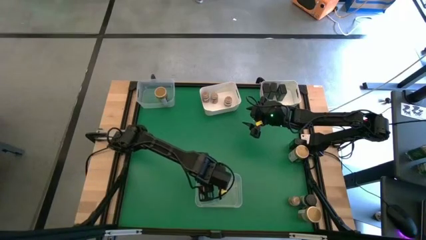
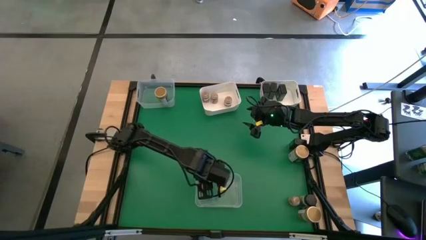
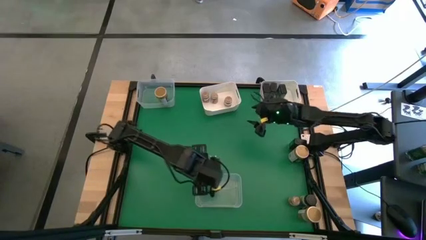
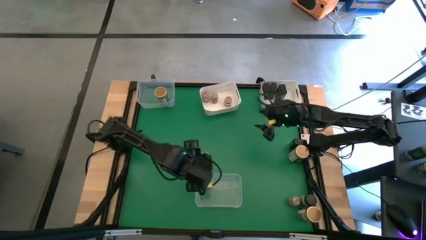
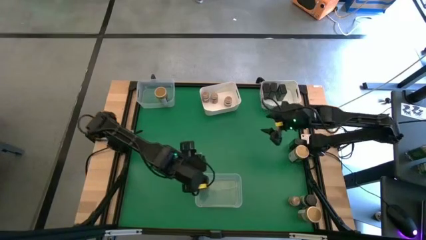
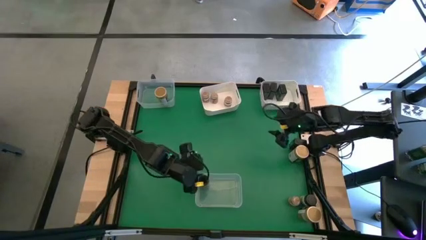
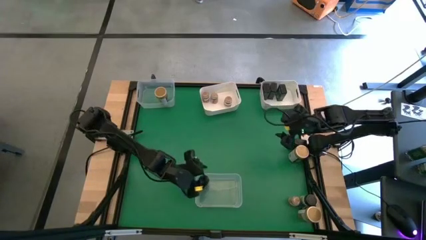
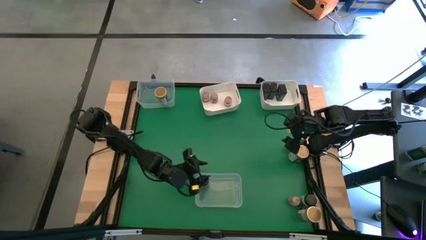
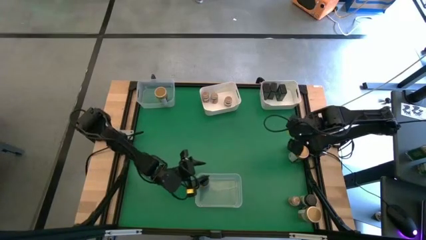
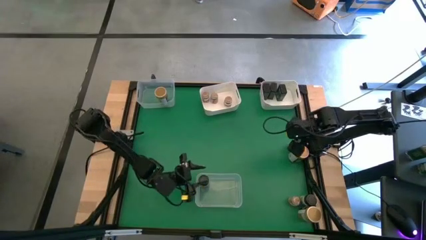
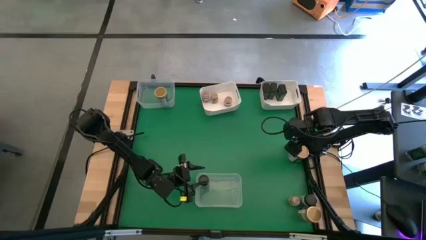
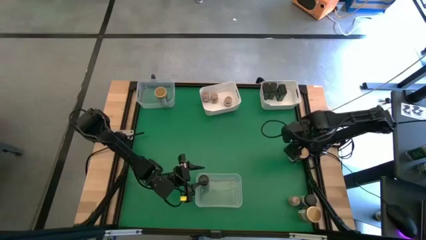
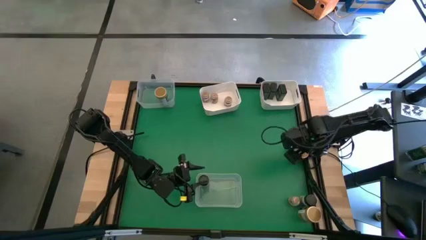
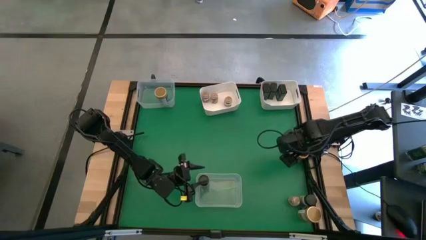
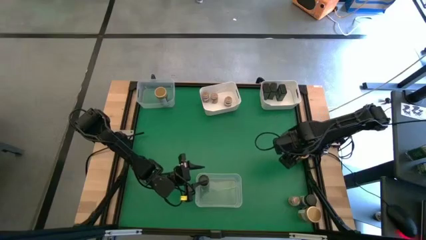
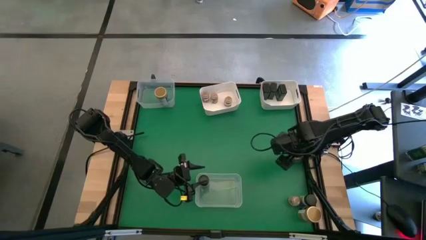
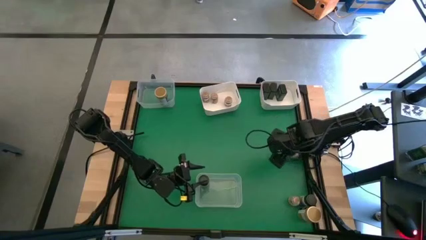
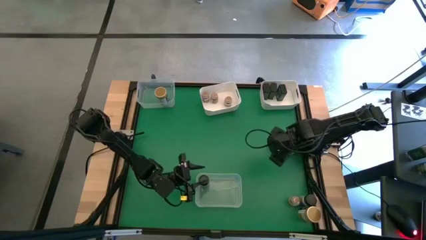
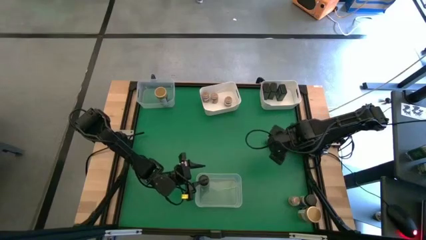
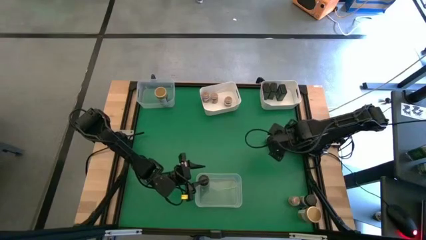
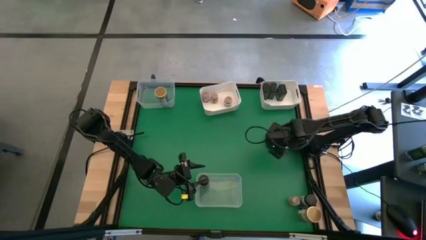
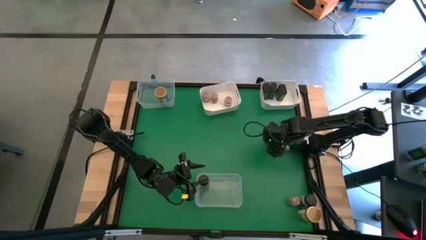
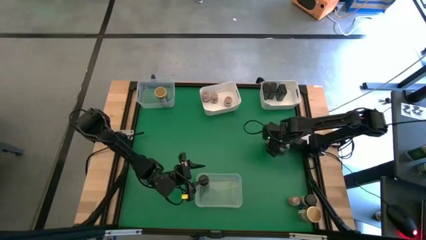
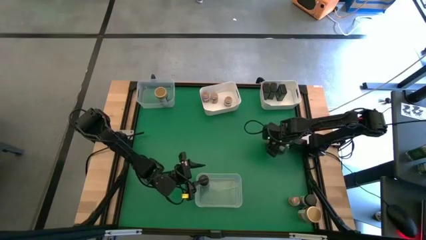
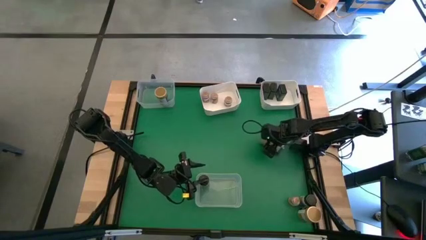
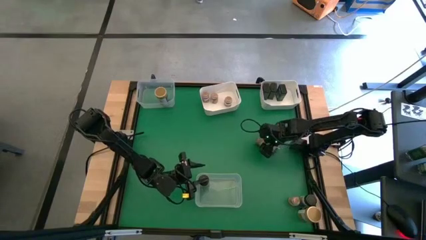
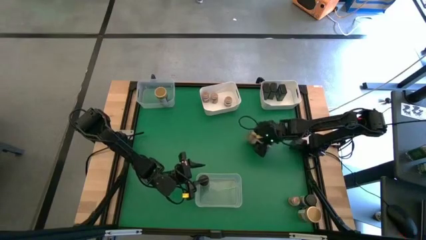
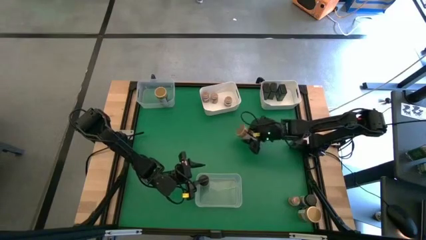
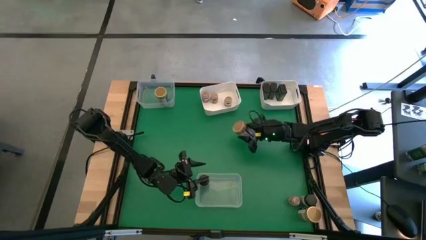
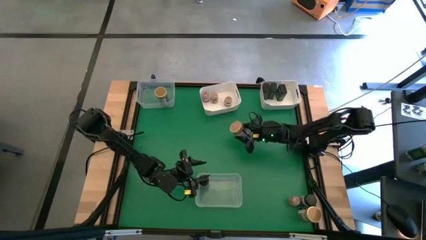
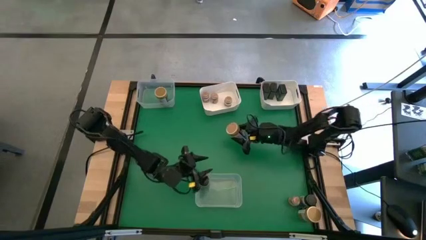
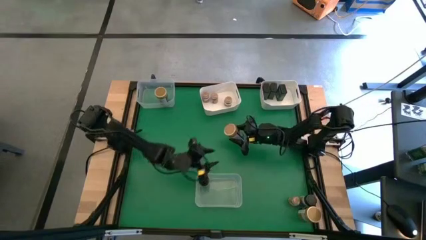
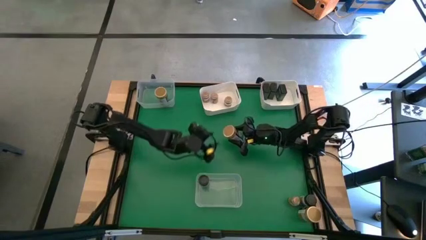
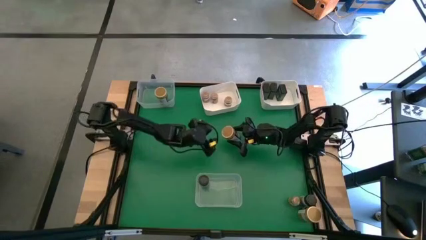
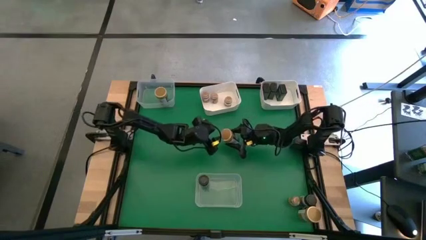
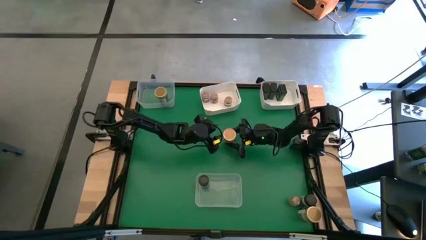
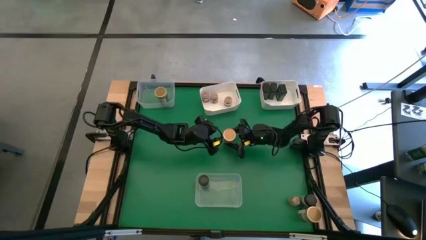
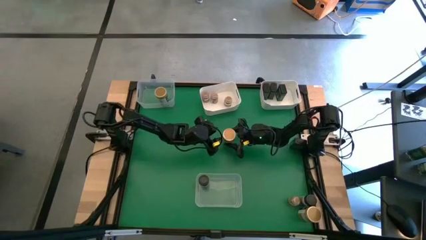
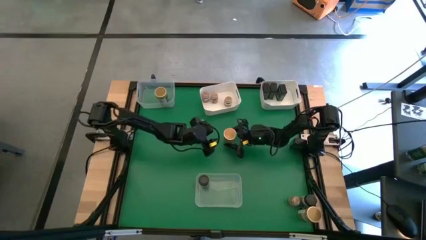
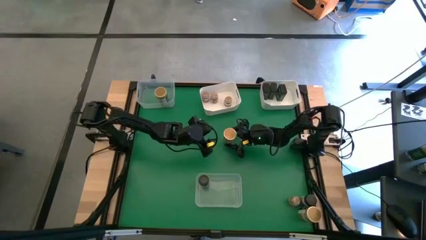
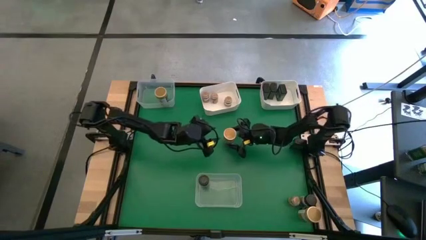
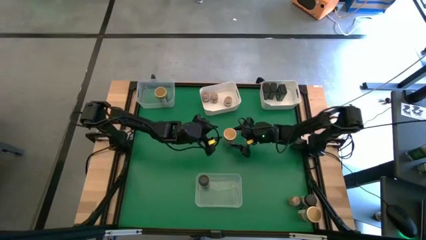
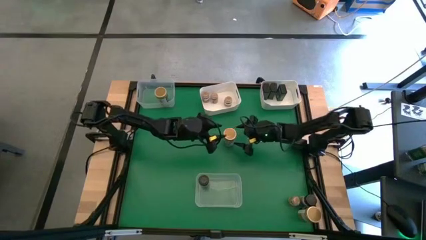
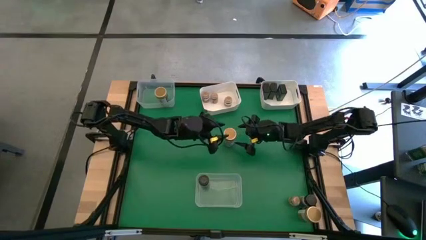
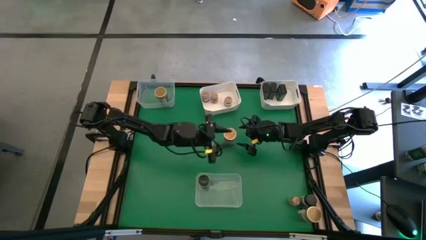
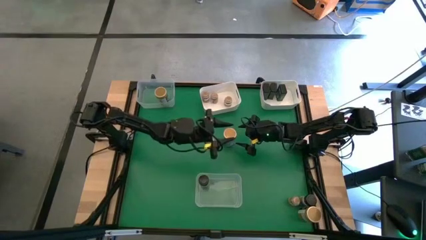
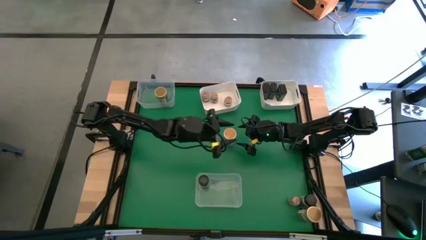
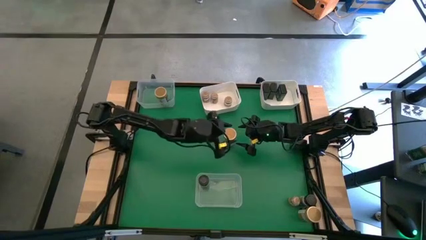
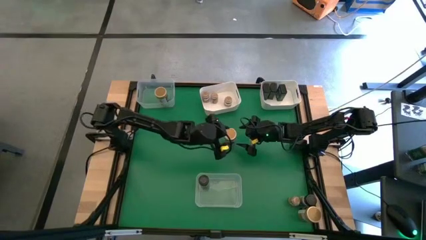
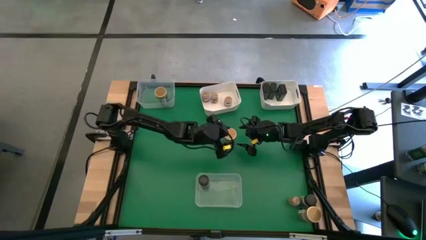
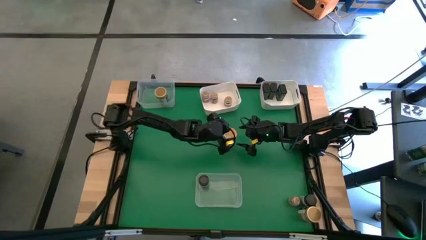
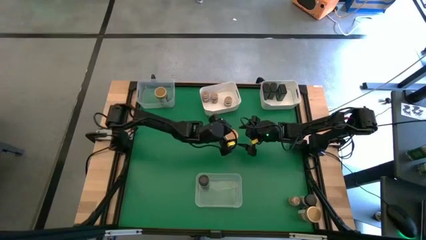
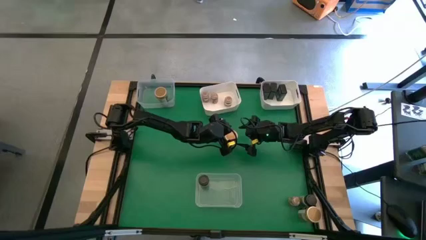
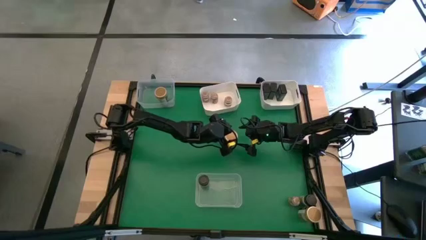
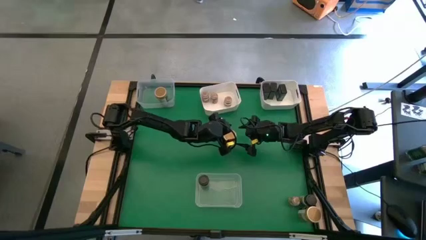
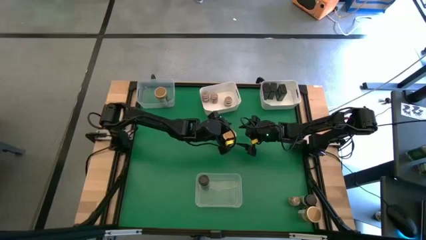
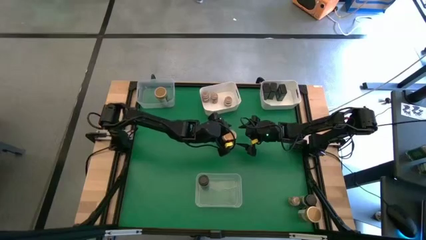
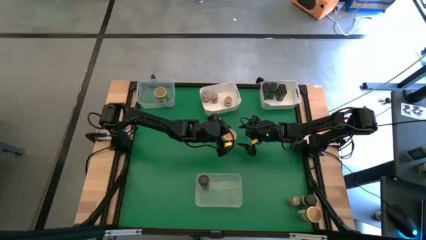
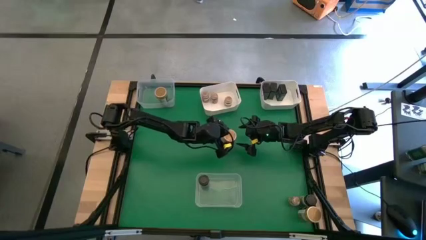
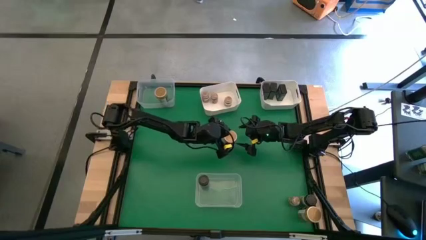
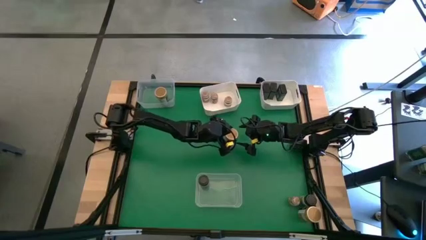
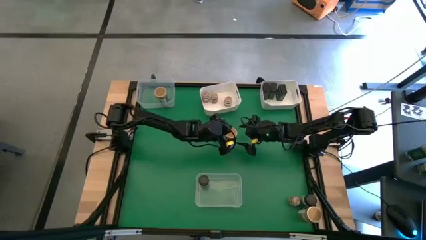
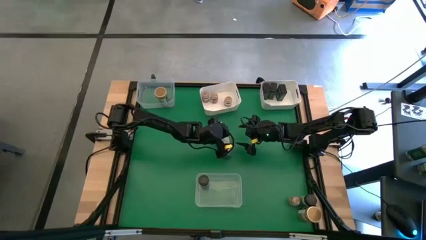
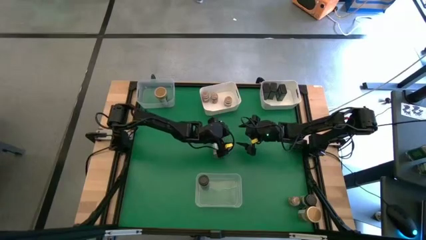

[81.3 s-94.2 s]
Task: Sort spices by type
Put the gold seasoning bottle into the top transparent bin

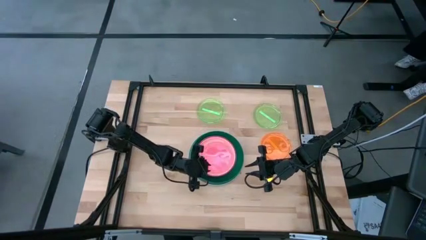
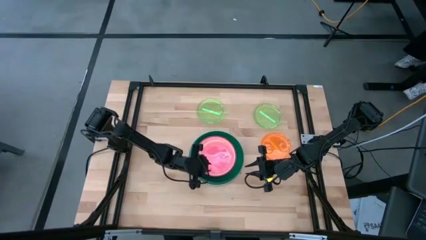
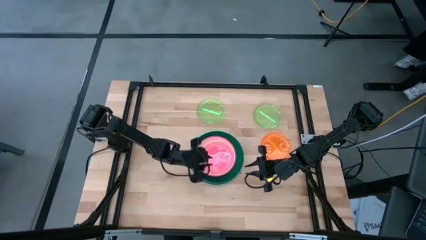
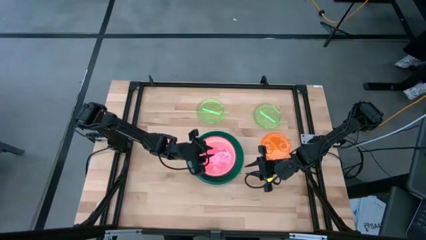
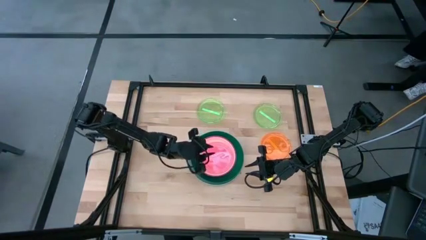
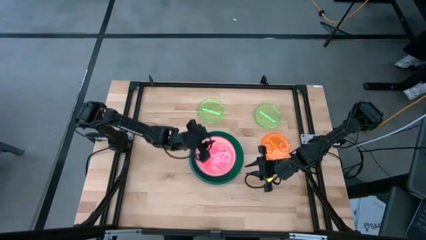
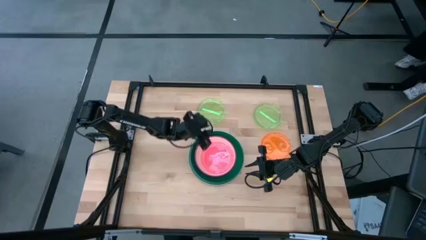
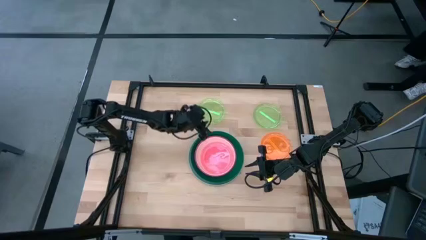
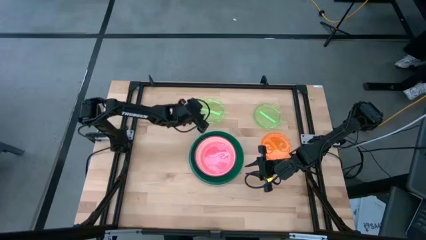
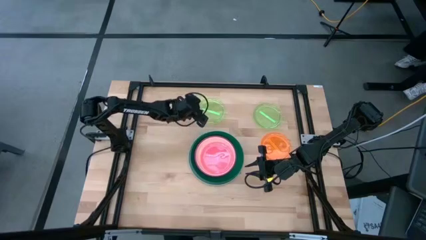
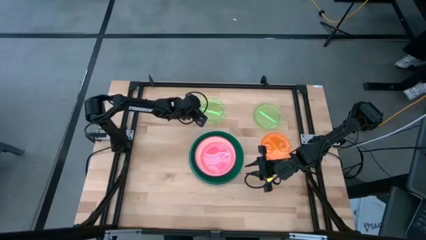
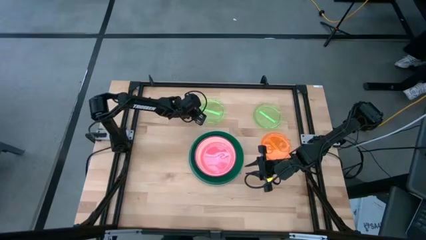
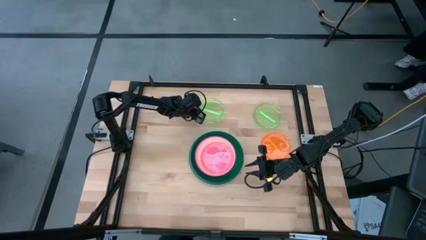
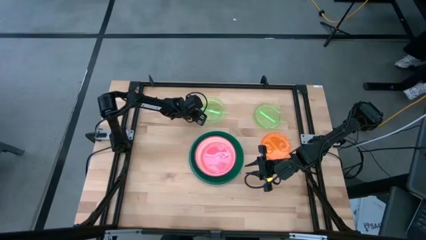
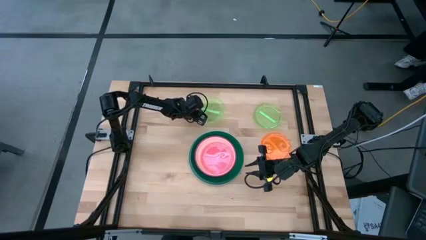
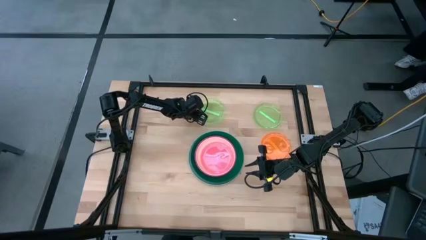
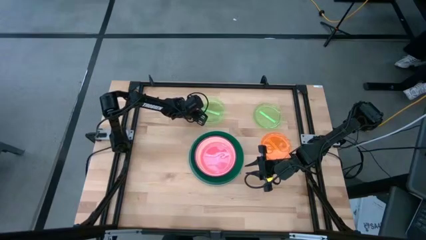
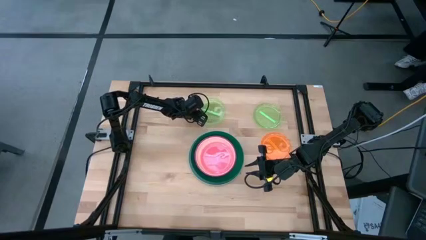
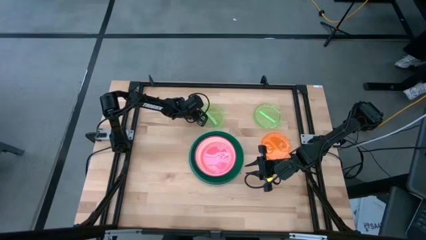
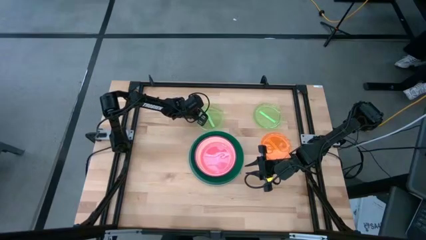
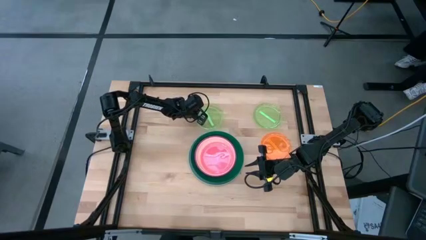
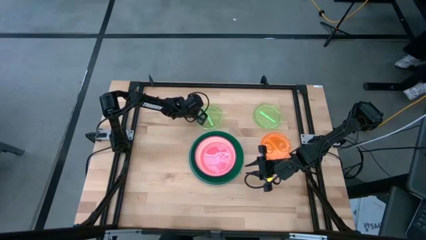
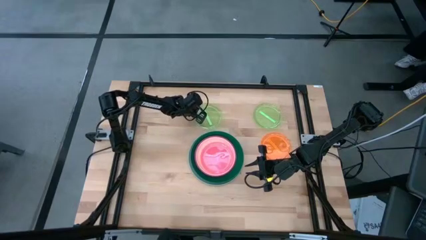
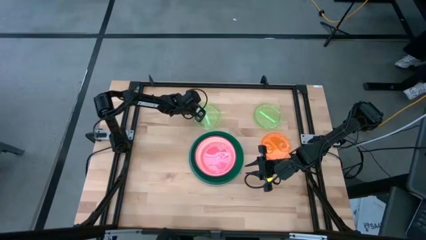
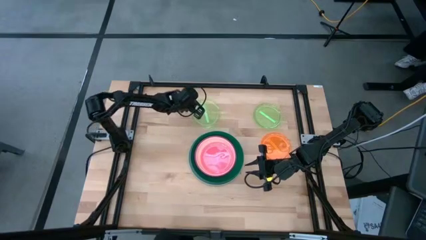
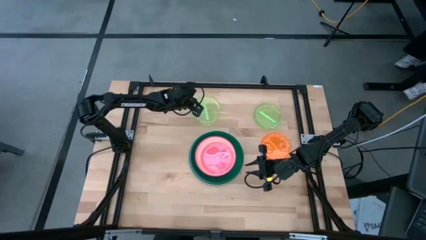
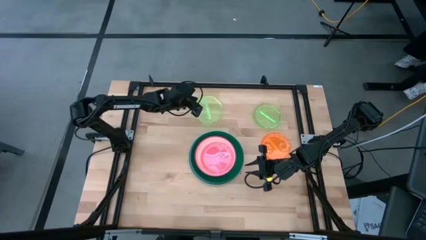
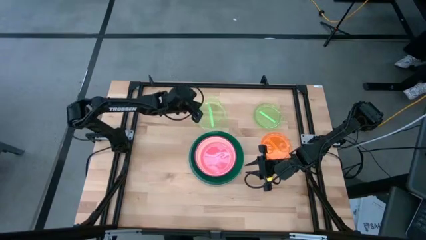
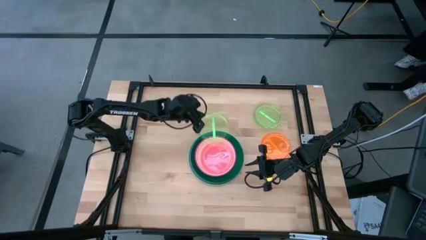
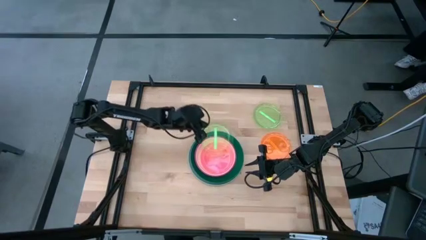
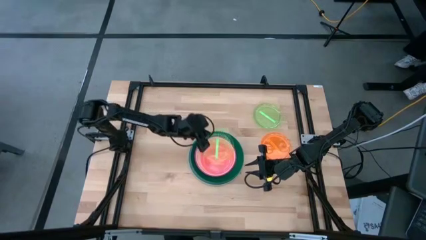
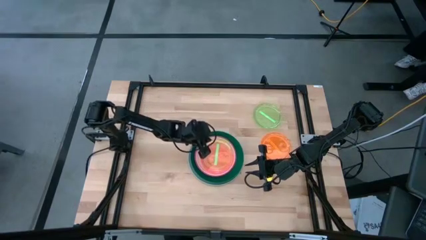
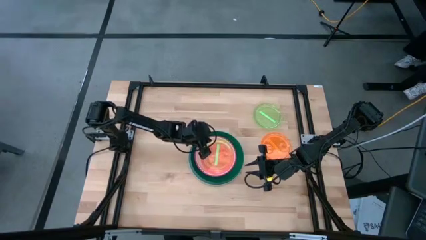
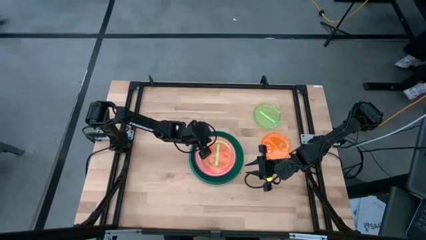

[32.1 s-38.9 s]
Task: Stack plastic plates
Stack the left light green plate on top of the light pink plate
